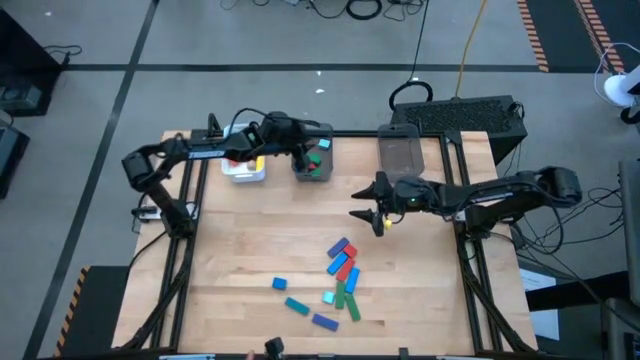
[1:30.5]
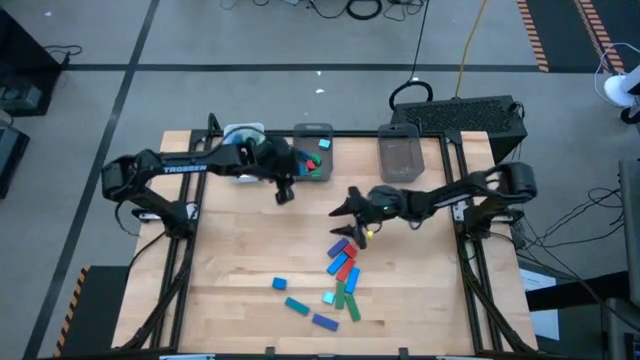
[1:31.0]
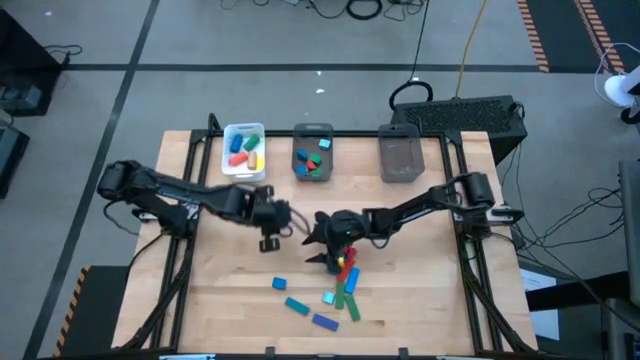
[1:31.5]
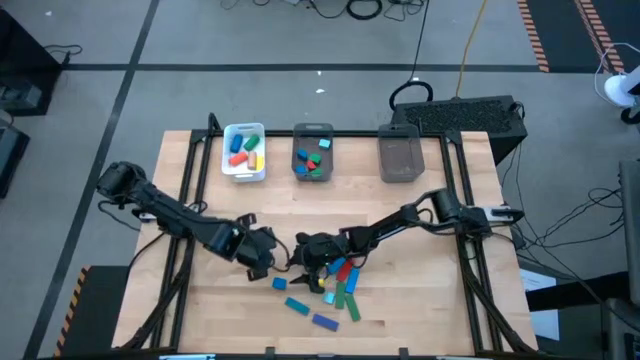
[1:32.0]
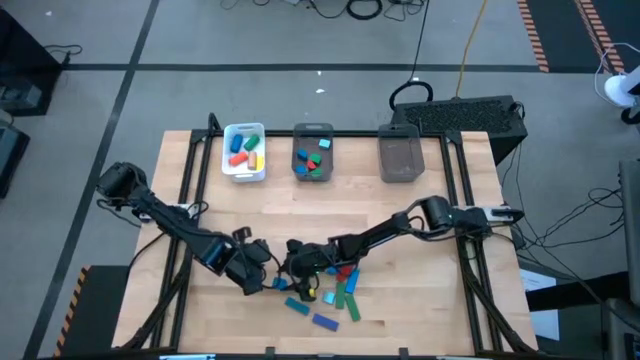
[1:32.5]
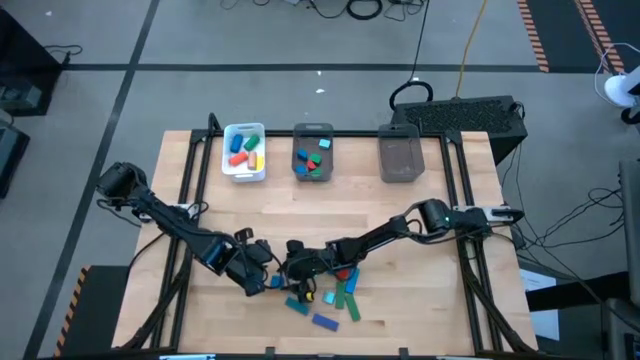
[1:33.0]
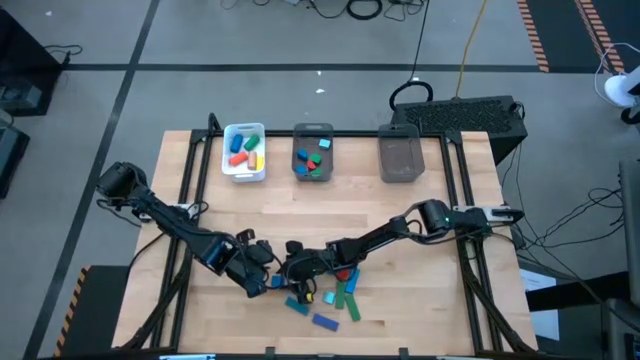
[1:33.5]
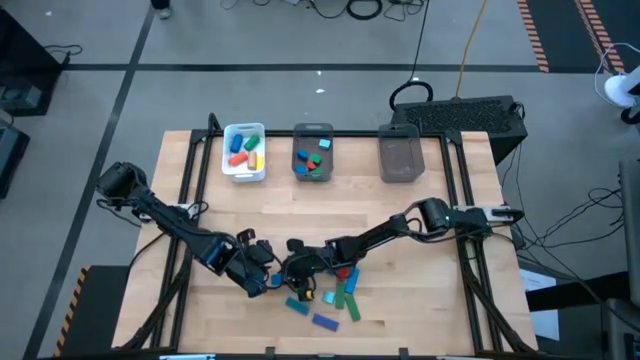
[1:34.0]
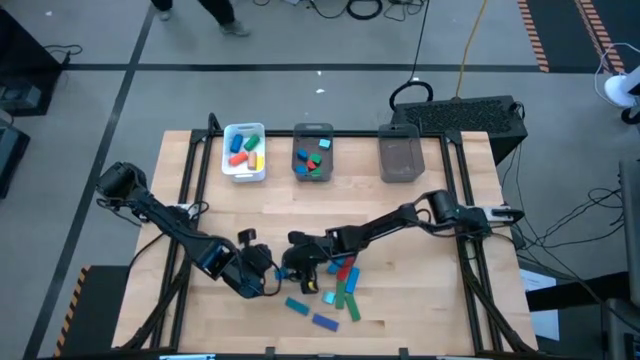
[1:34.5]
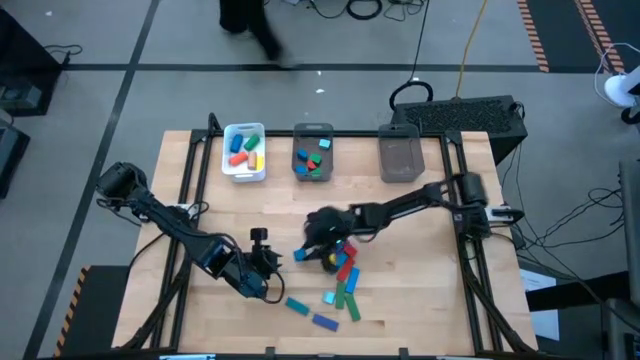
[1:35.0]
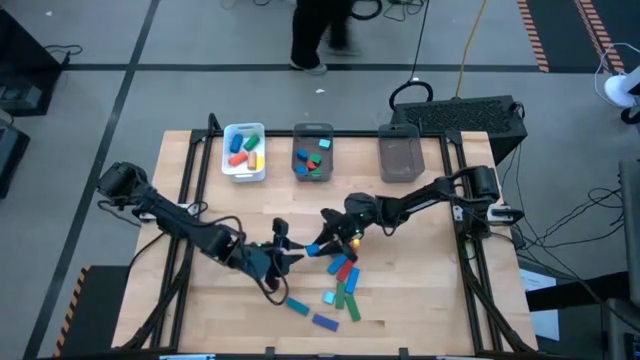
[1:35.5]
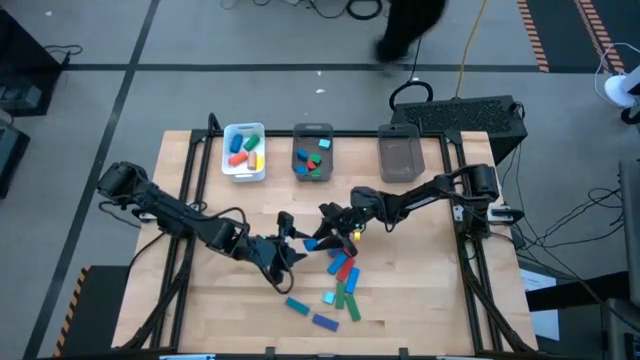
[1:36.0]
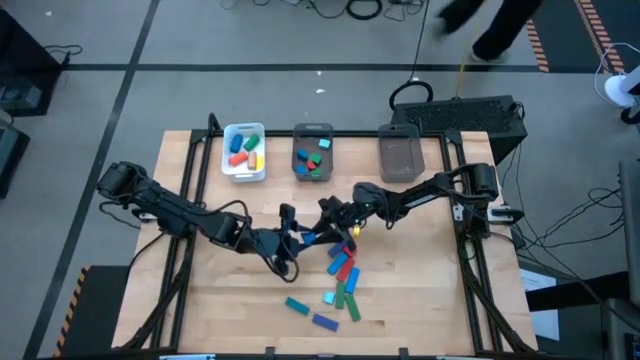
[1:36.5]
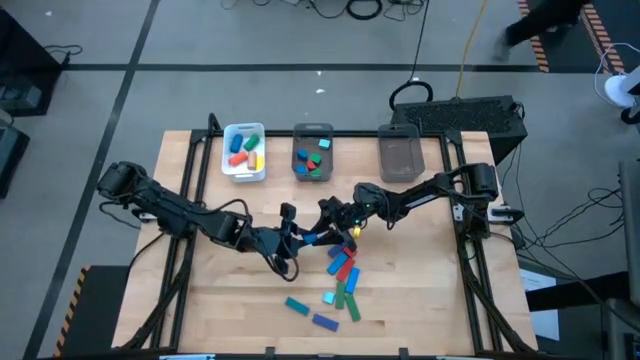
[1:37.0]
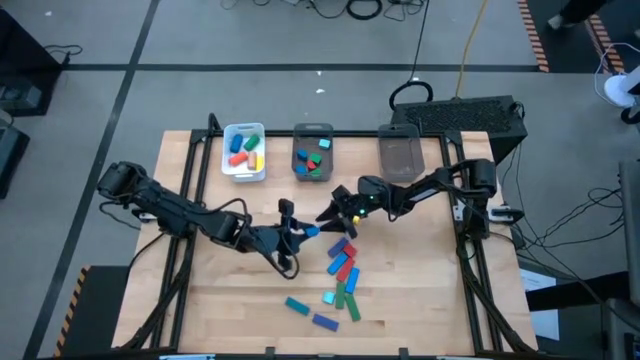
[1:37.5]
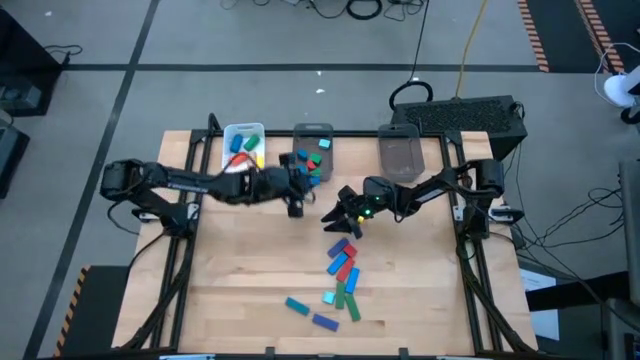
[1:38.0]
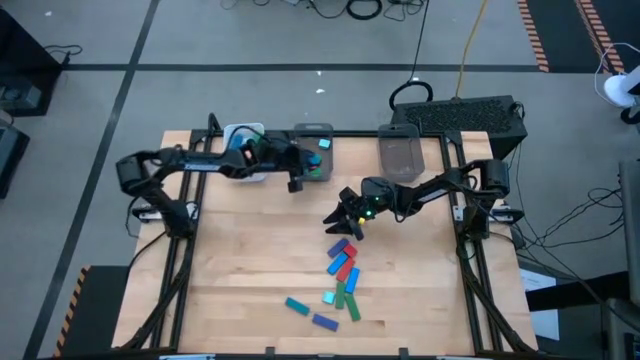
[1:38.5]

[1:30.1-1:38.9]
Task: Sort blocks by size
Put the blue half circle block into the left black bin

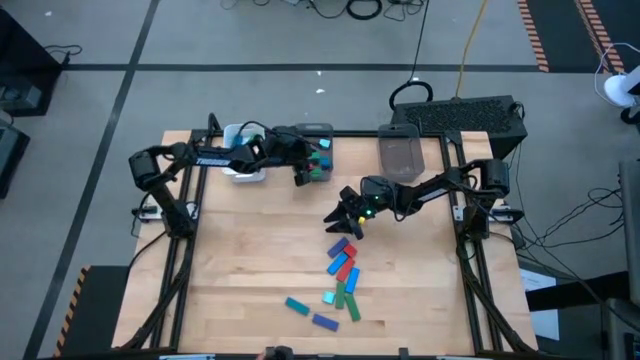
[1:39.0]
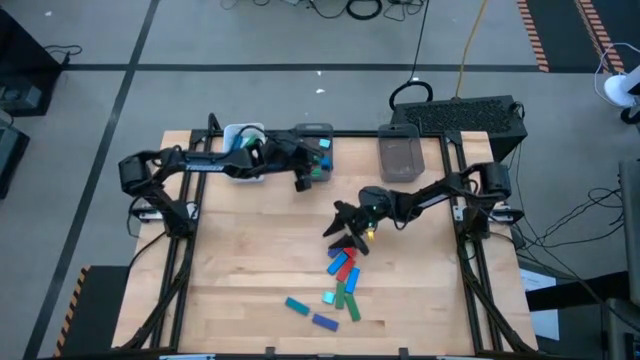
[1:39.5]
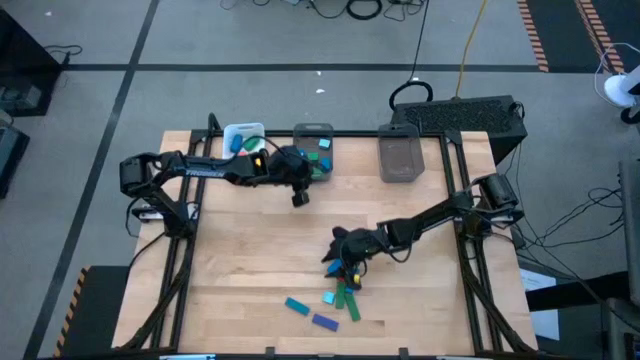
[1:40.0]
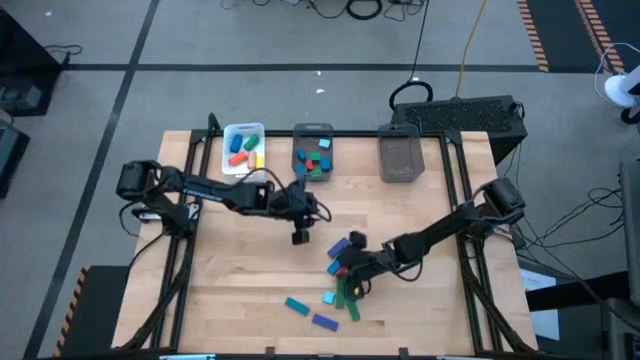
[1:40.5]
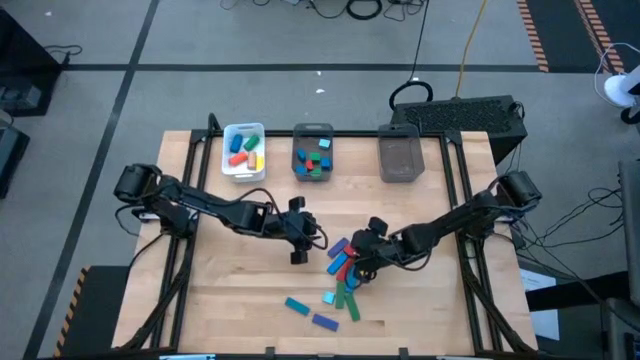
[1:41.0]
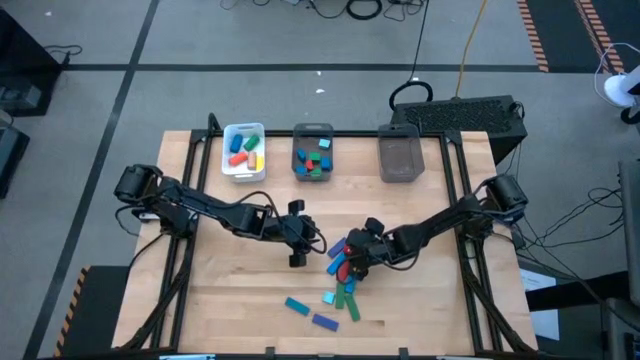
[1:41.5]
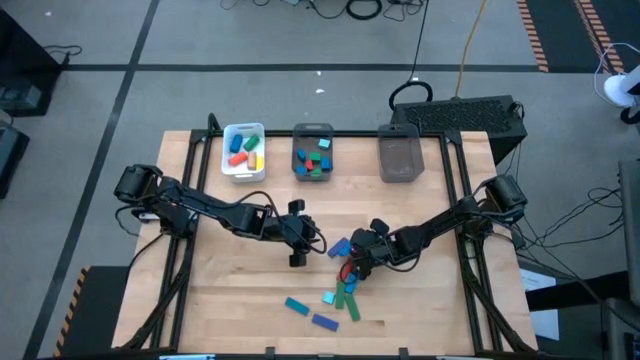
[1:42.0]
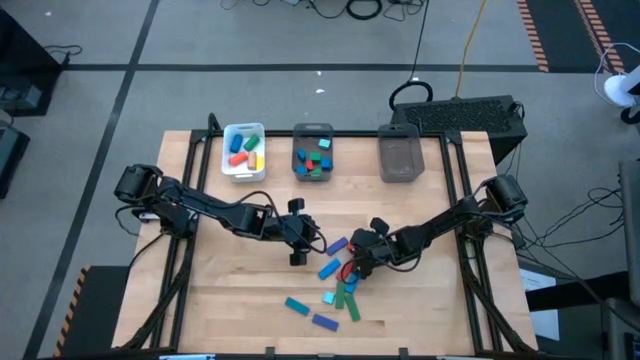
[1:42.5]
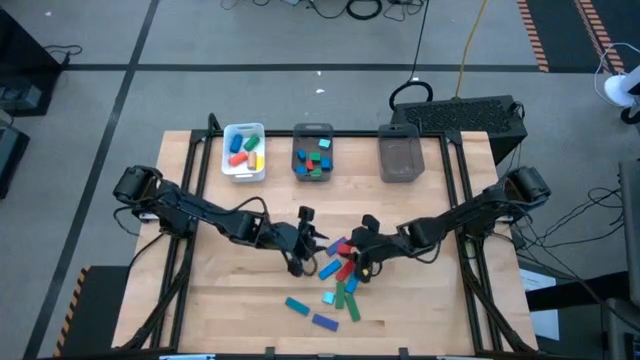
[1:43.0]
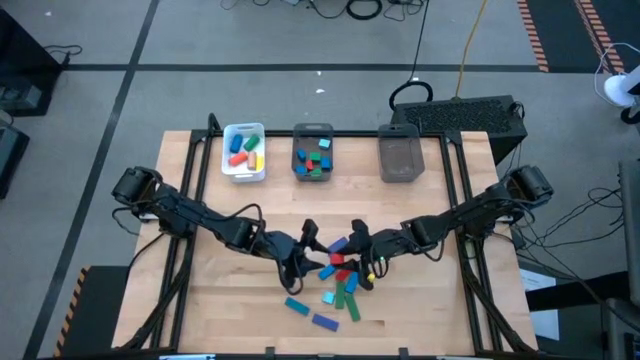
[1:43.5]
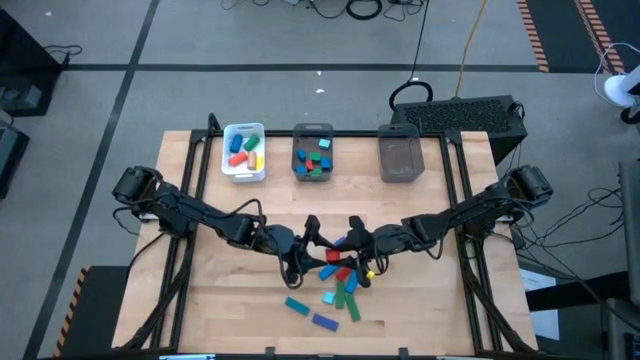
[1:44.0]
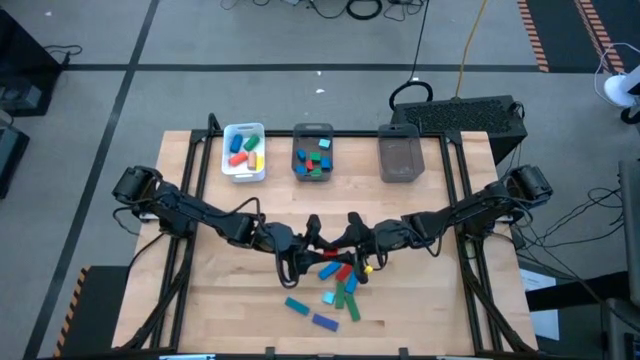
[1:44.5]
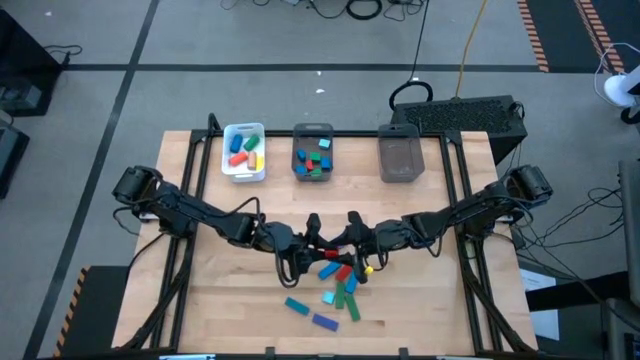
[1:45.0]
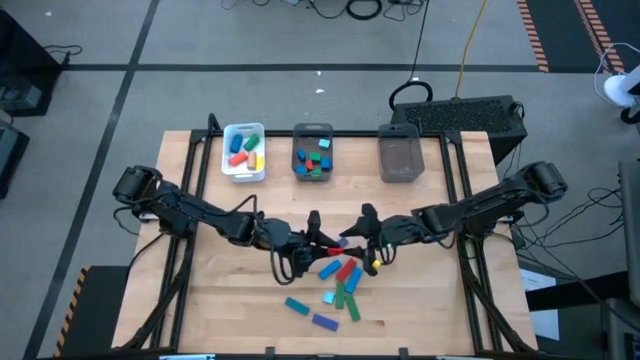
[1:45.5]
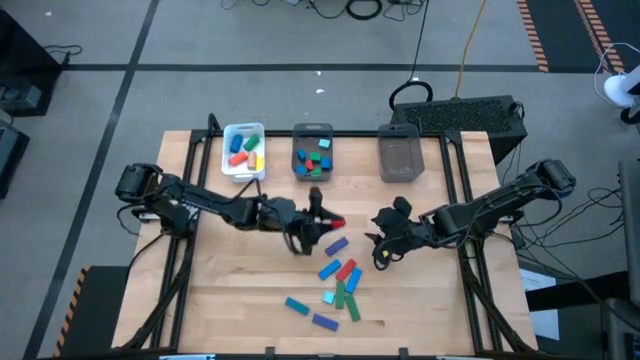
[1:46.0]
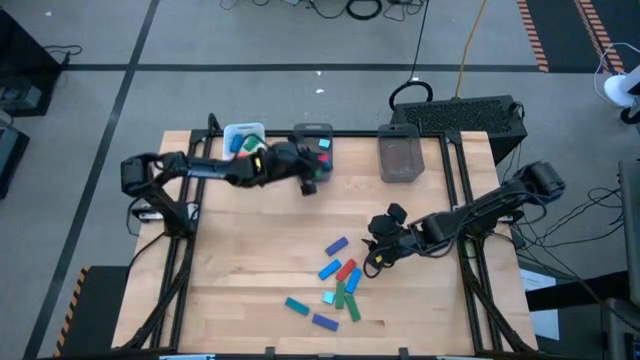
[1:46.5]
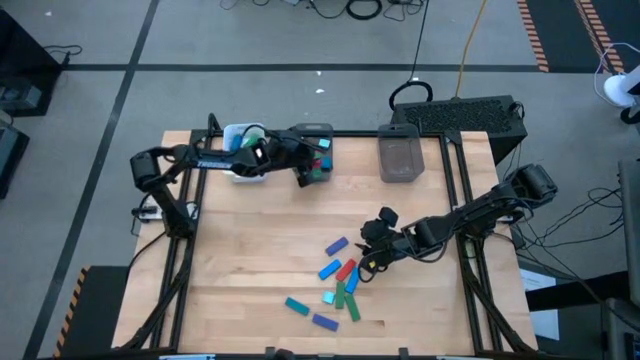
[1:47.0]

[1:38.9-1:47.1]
Put the red half circle block into the left black bin

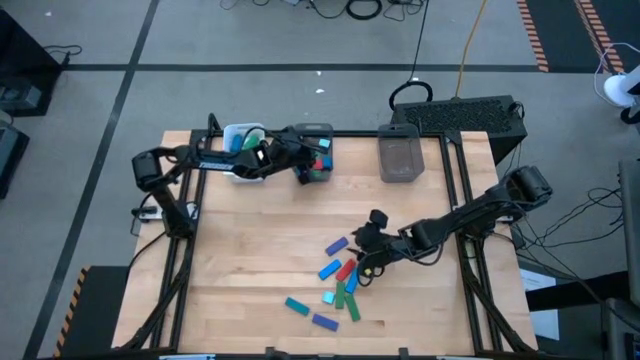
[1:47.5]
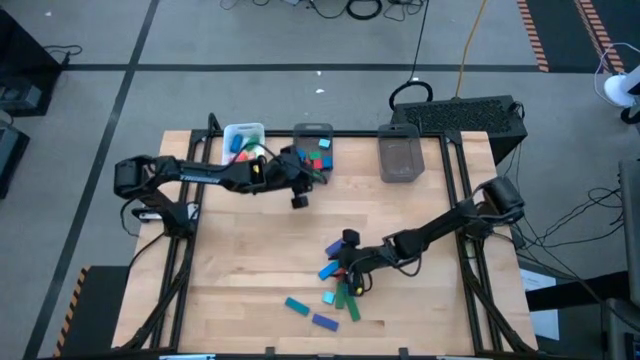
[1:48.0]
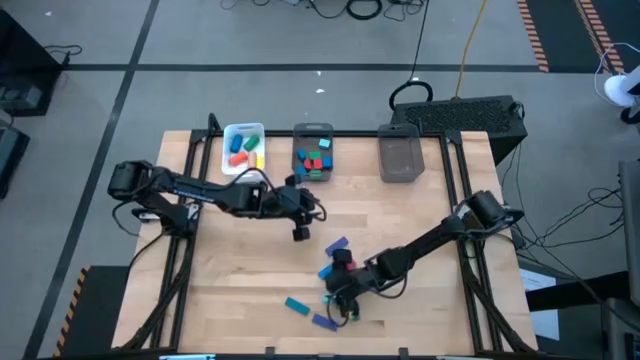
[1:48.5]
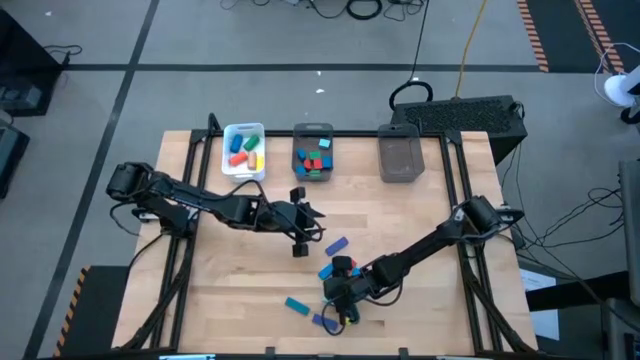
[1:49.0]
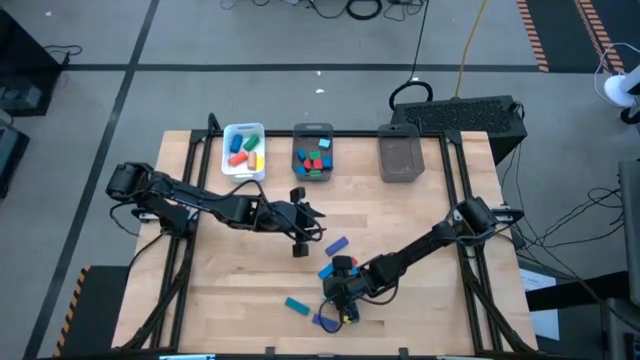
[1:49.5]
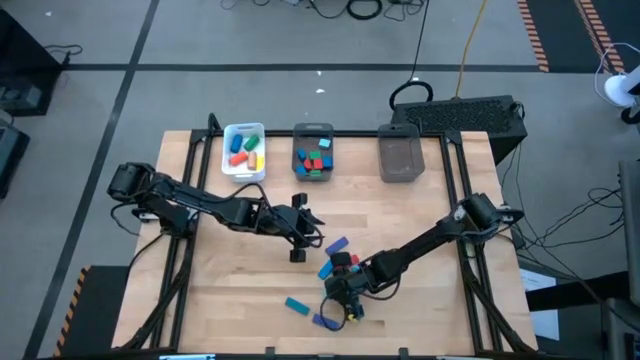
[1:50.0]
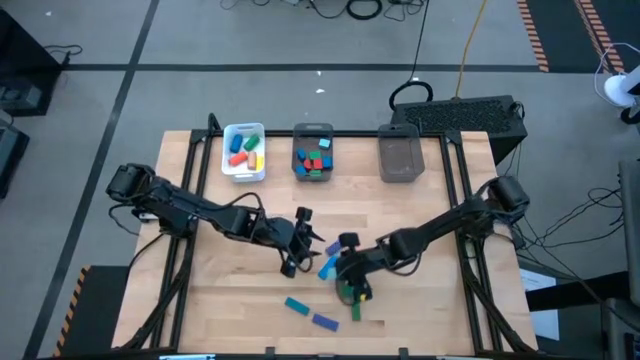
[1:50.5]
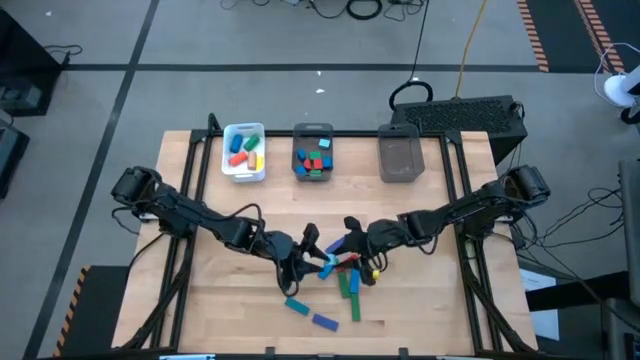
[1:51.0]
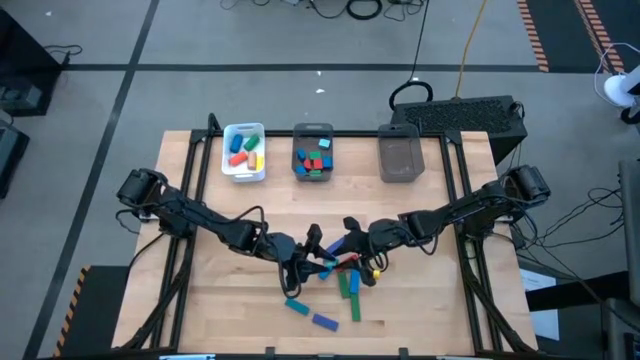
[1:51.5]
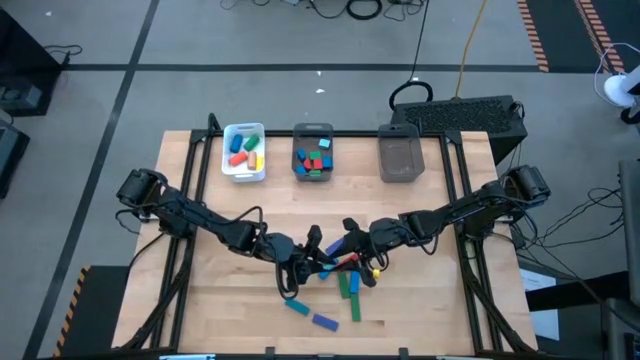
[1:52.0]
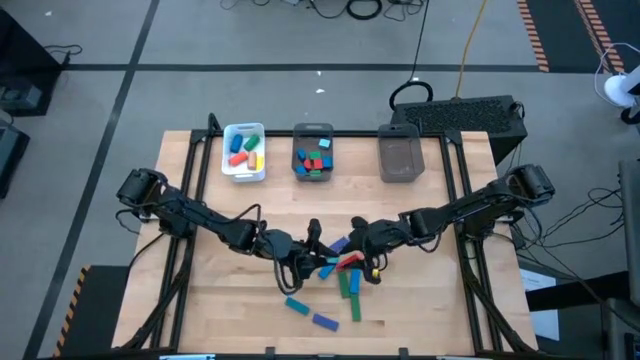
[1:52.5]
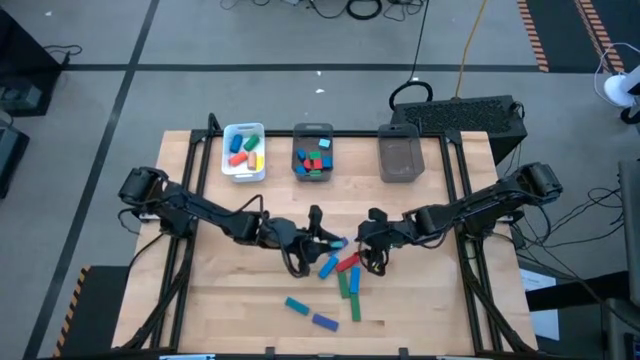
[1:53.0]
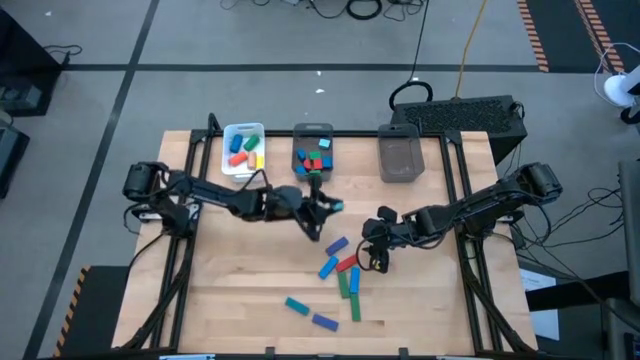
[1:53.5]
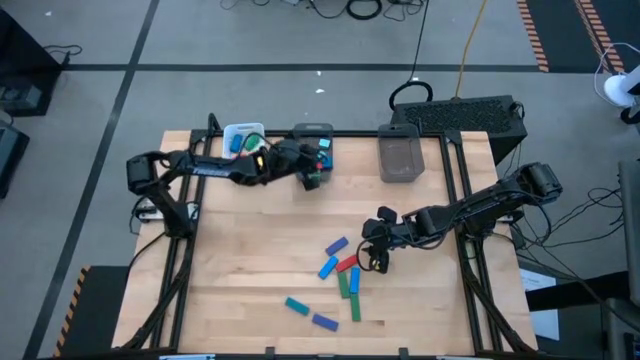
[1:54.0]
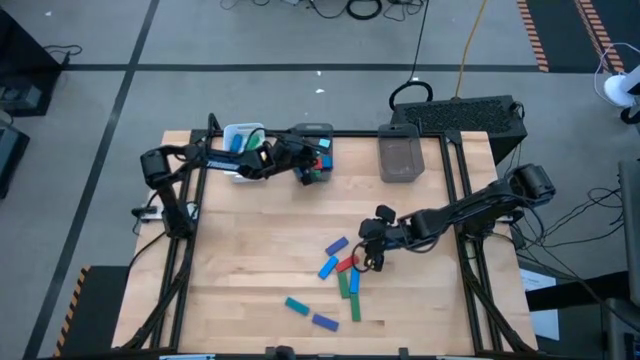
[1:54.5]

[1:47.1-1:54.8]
Put the light blue half circle block into the left black bin
